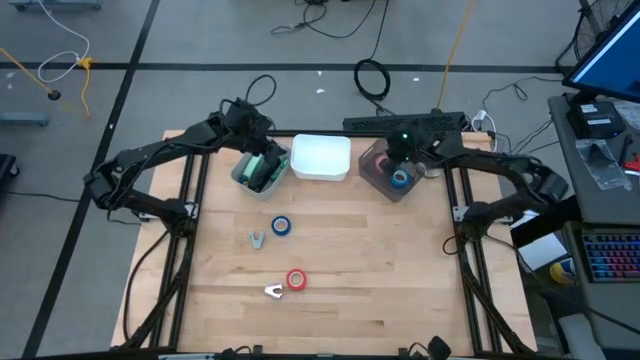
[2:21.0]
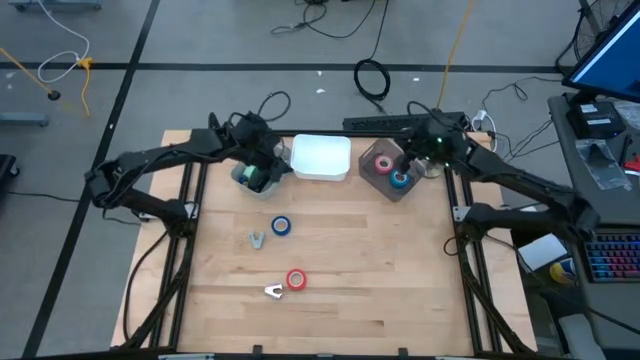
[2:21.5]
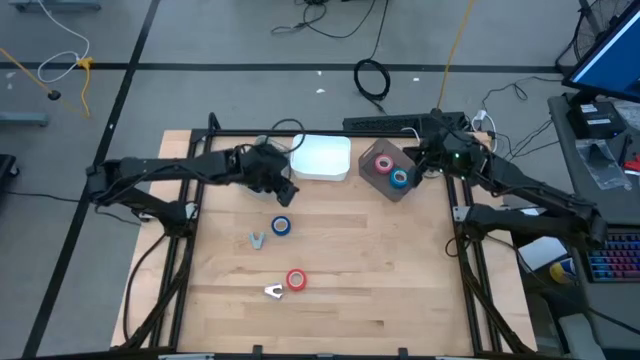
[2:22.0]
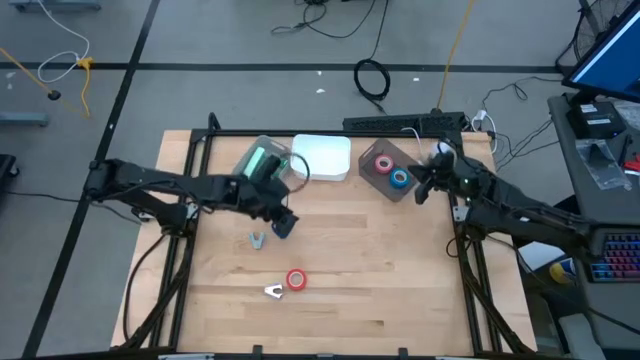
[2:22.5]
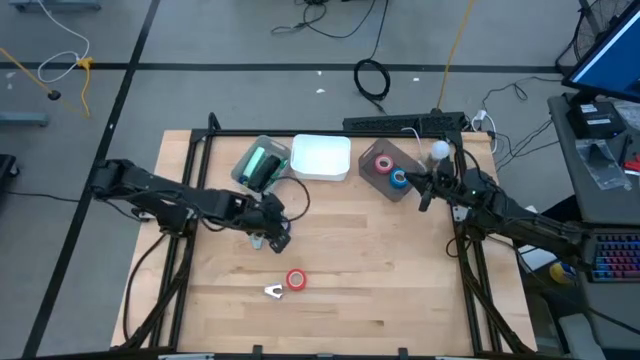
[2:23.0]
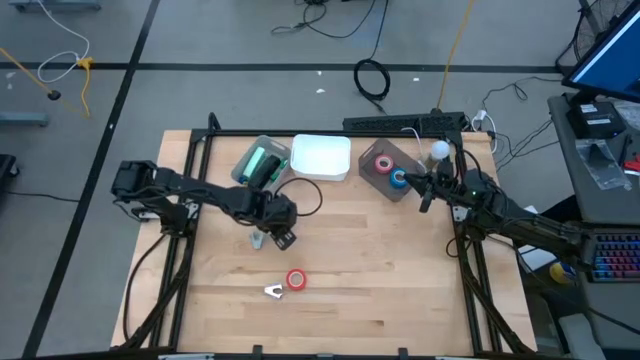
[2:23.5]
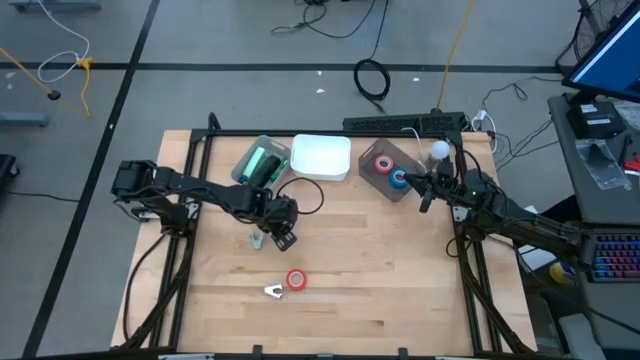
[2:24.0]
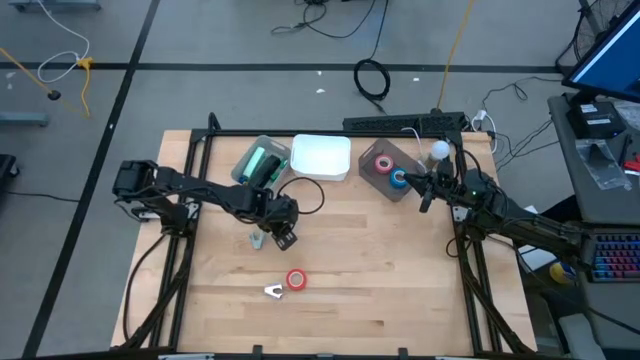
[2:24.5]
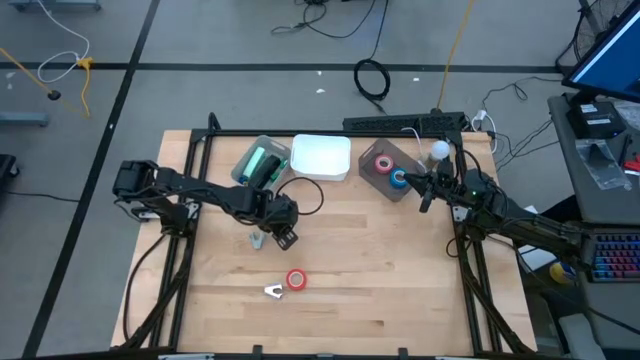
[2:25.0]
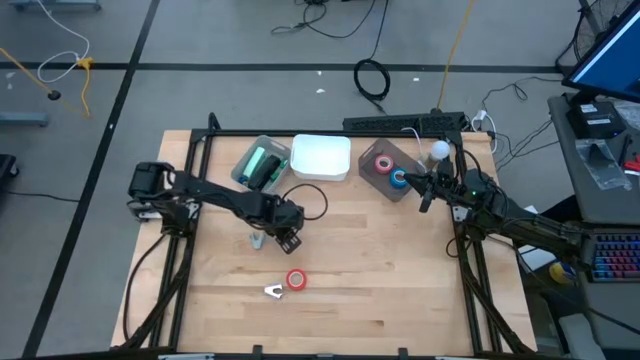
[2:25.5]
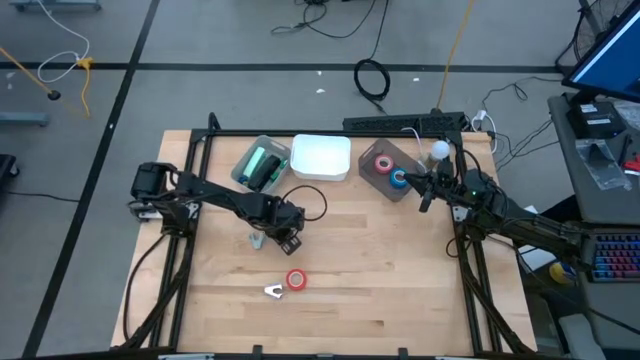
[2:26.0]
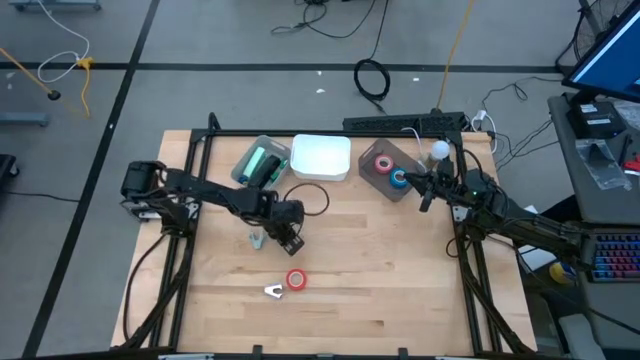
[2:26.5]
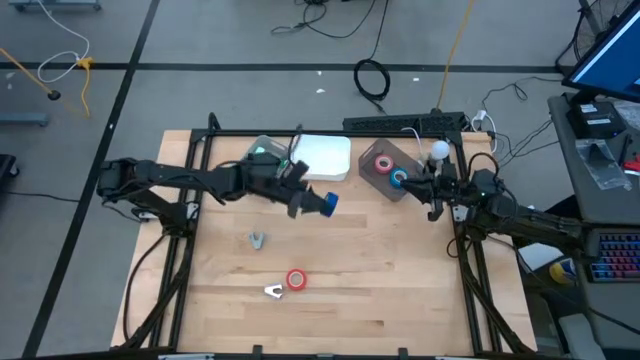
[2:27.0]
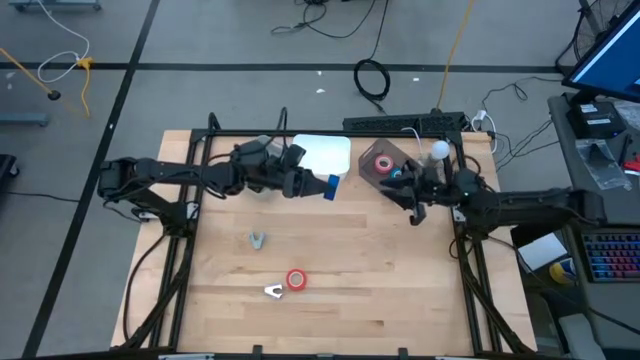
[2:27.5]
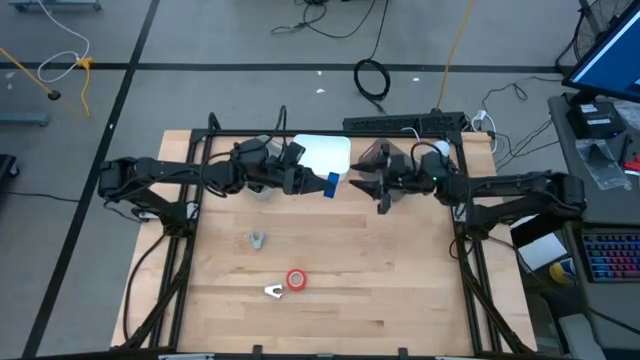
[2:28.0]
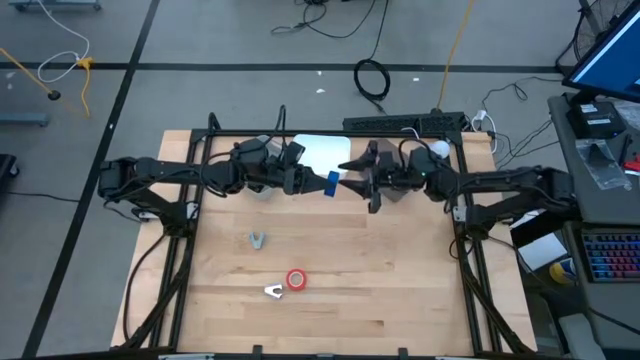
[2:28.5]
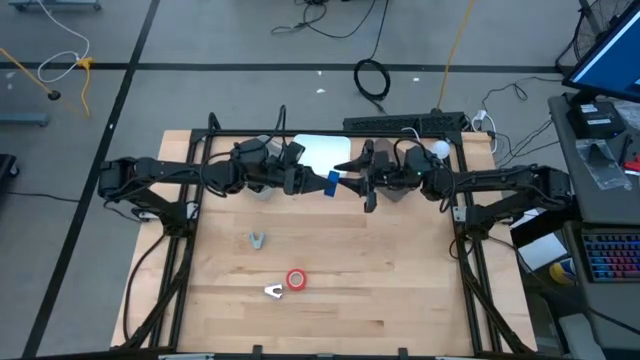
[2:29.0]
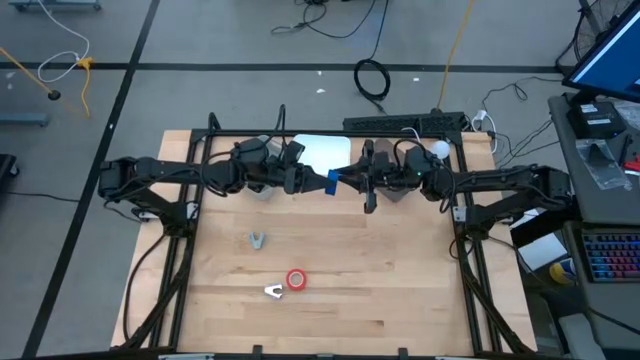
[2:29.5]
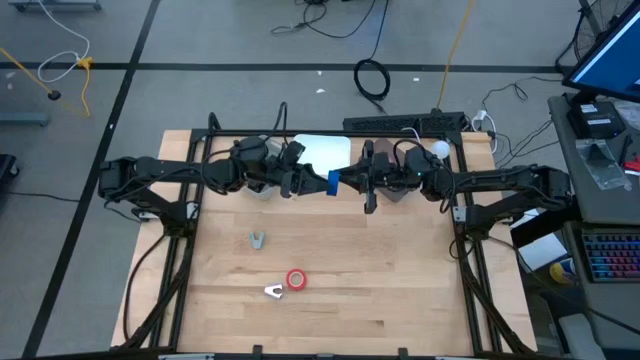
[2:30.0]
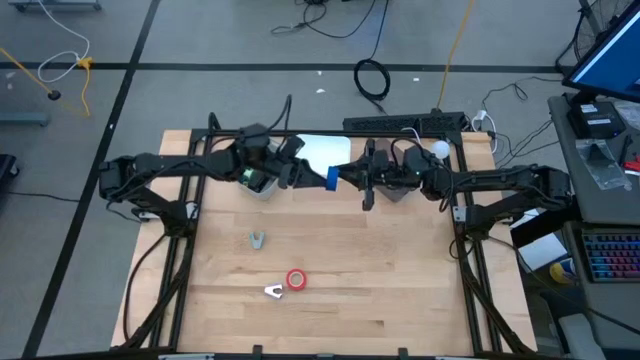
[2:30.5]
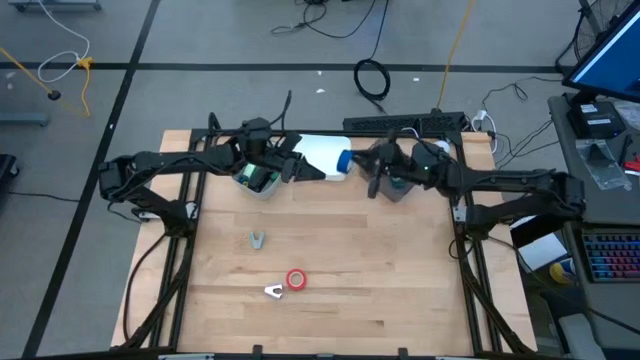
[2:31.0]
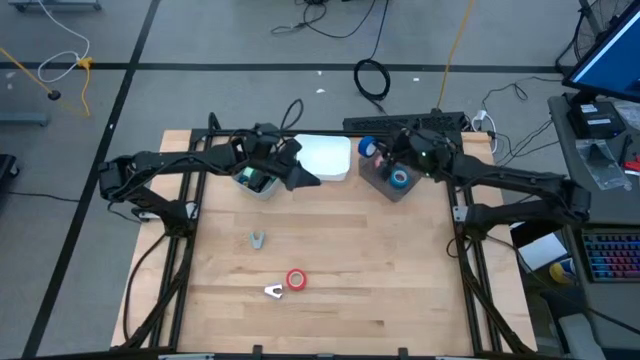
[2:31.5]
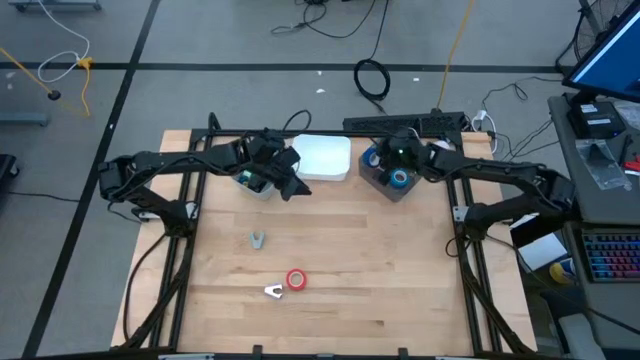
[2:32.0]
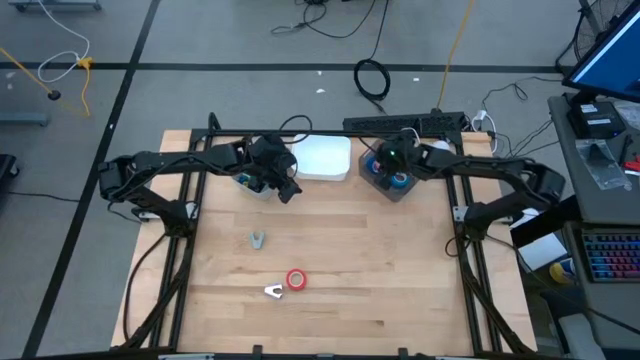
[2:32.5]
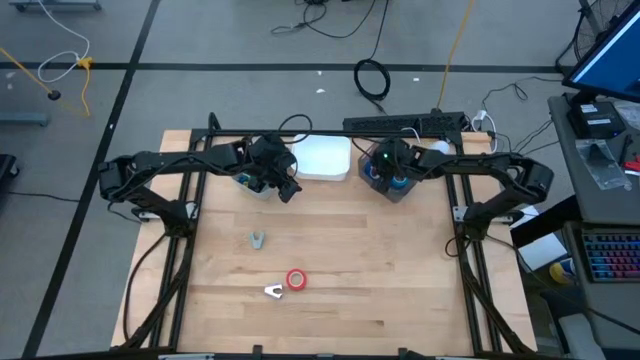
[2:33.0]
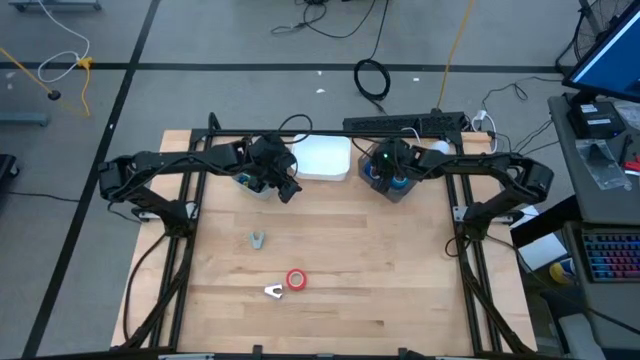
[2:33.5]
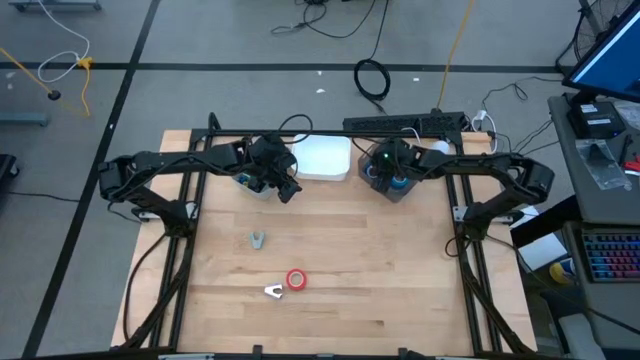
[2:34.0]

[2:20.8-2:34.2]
Task: Pick and place Stapler, Stapler remover, tape
Put the dark blue tape into the black bin

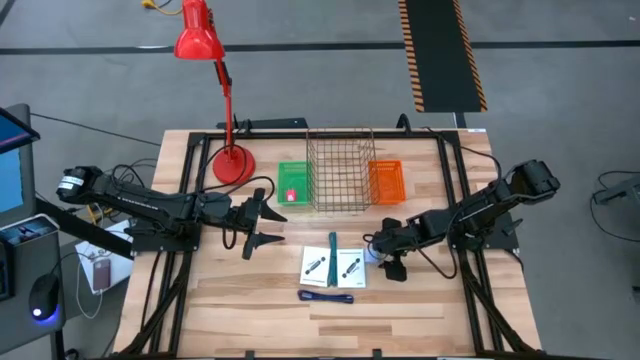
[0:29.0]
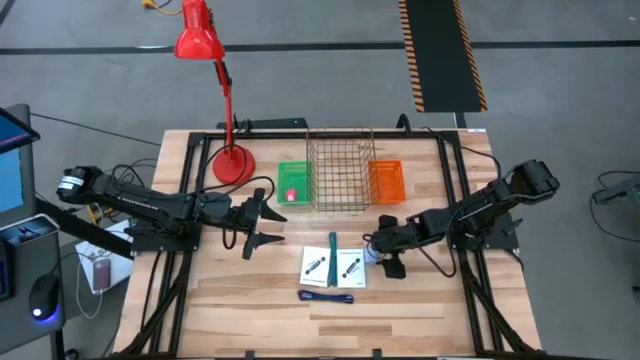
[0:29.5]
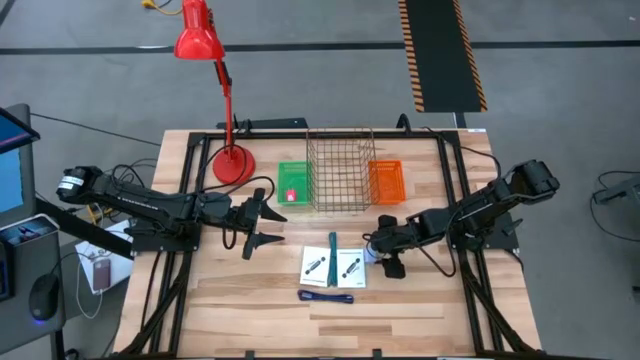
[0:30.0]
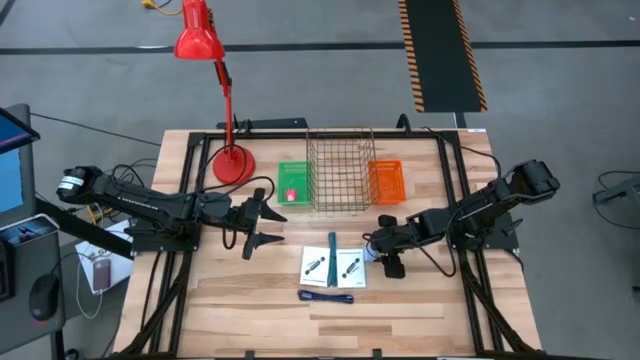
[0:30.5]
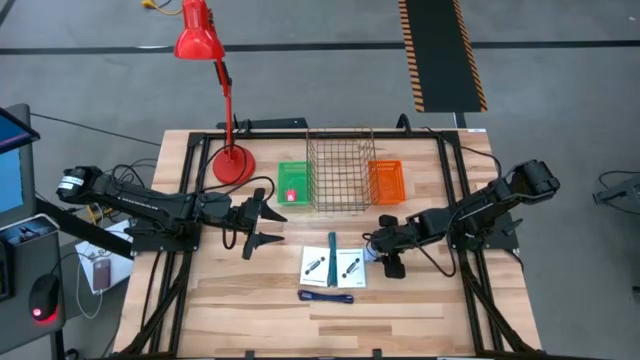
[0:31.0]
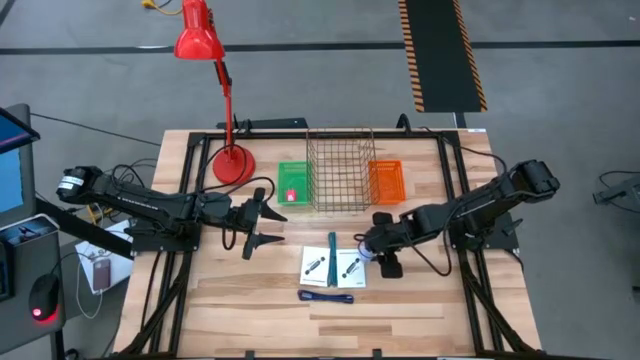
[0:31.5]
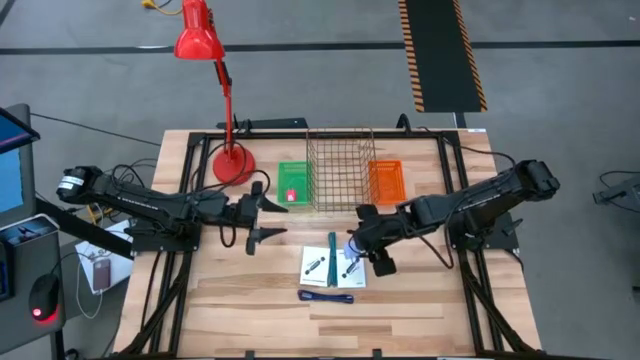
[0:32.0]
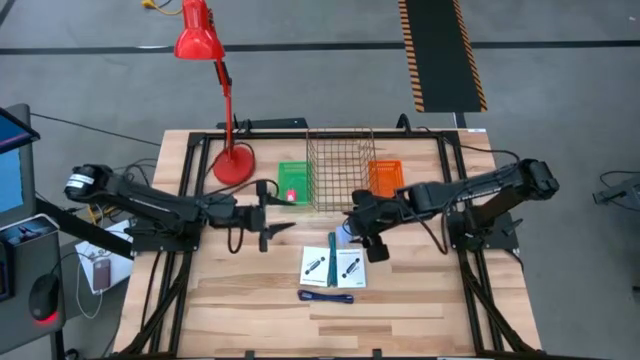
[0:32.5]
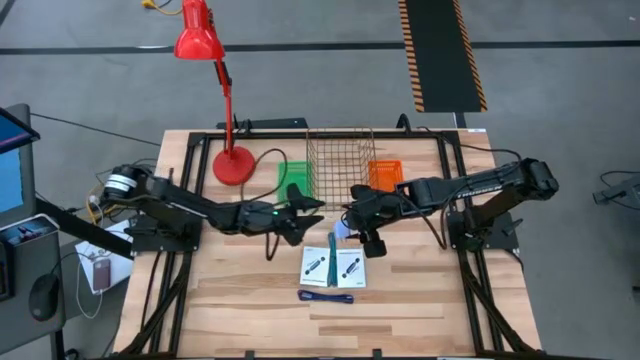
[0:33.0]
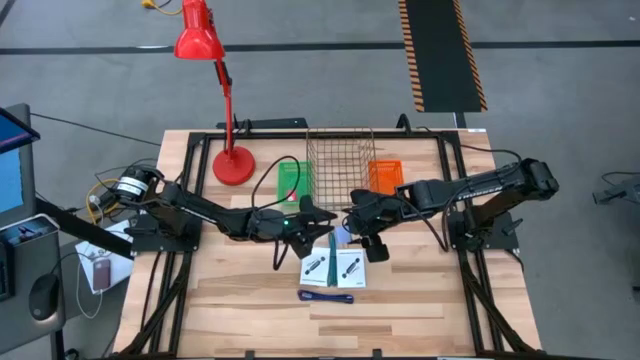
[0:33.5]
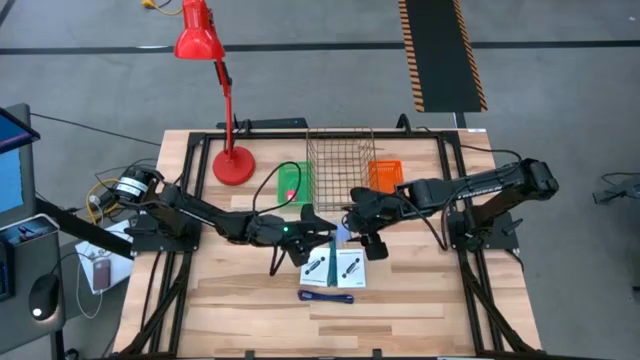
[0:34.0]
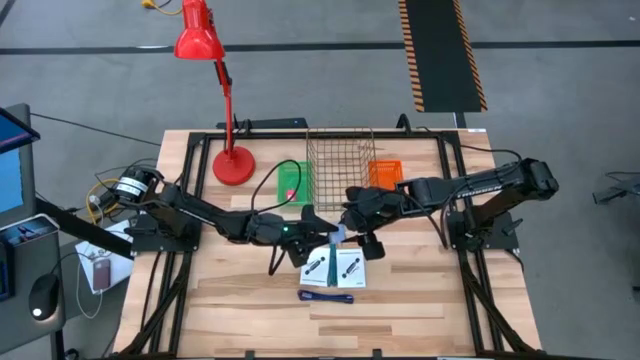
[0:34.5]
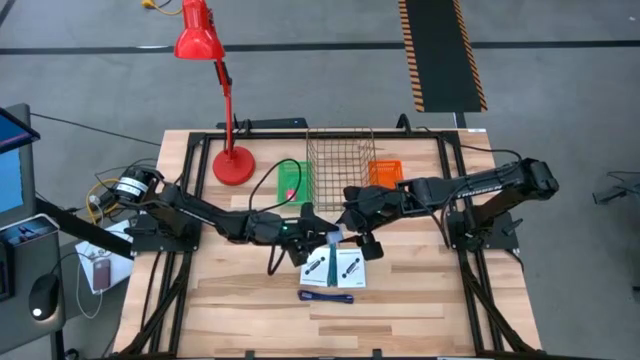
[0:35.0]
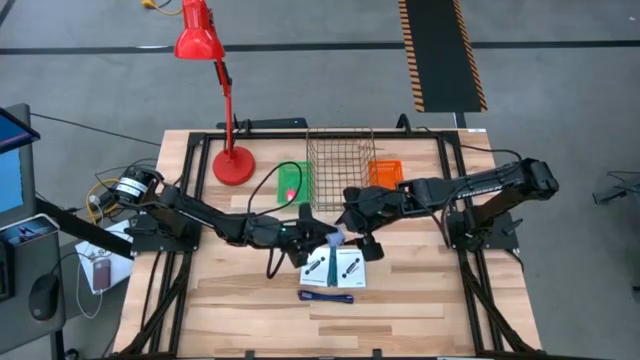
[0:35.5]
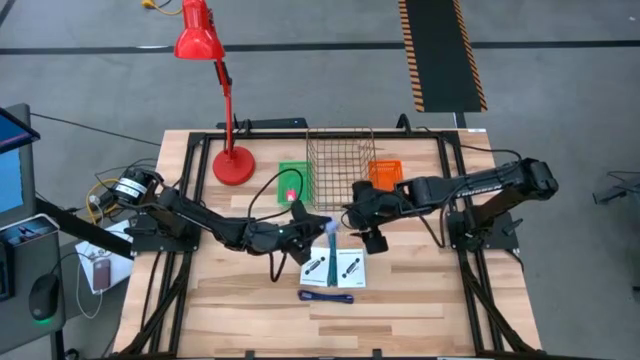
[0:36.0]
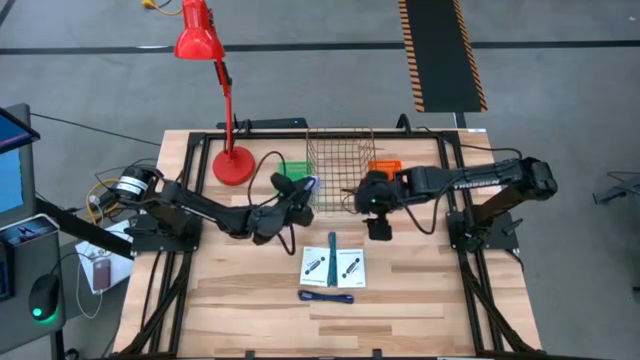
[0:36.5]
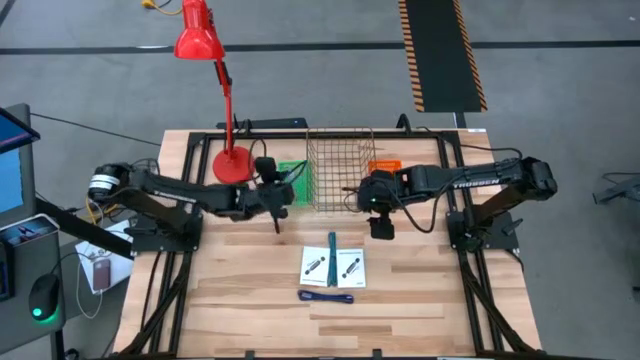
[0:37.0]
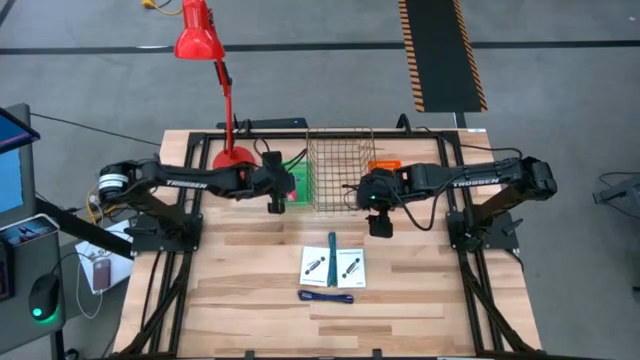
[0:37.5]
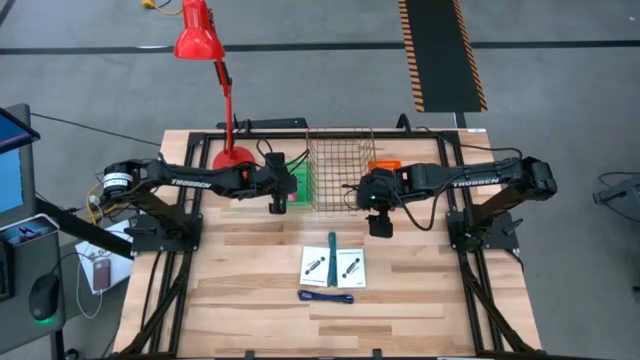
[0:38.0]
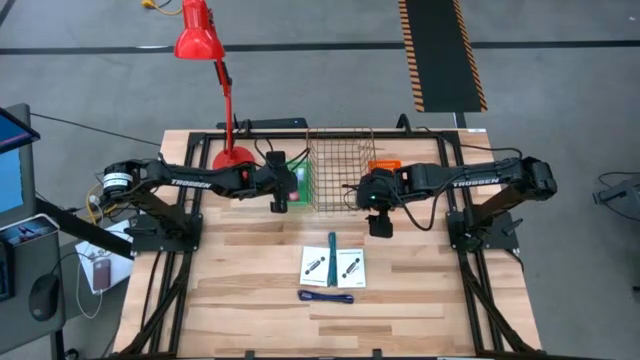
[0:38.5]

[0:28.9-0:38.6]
Task: Pick and place items into bin
Put the light violet charger adapter into the green bin
